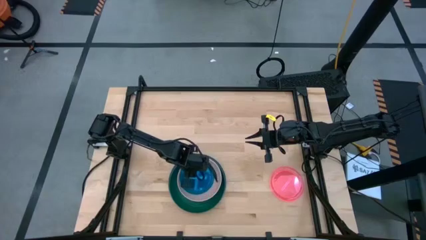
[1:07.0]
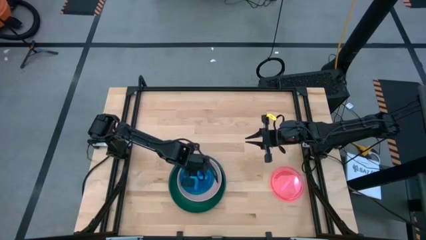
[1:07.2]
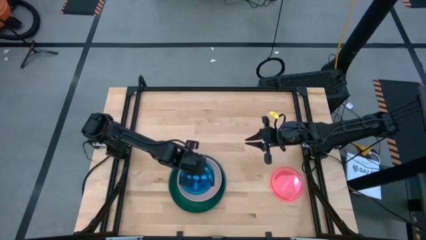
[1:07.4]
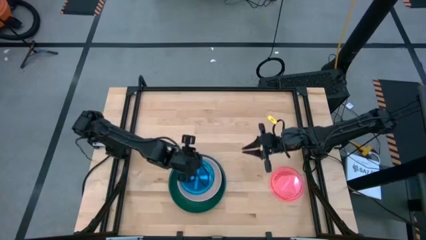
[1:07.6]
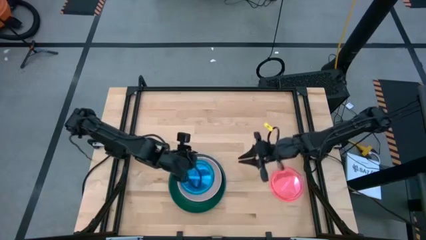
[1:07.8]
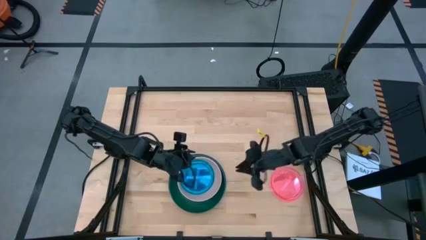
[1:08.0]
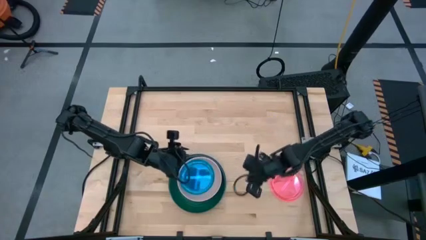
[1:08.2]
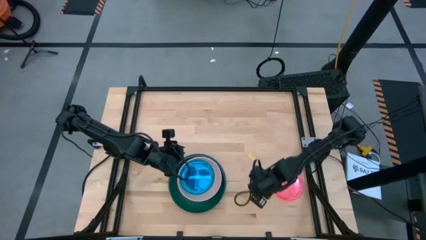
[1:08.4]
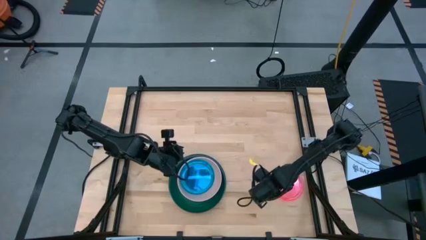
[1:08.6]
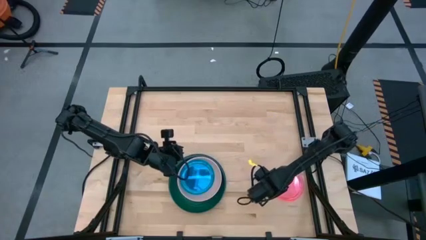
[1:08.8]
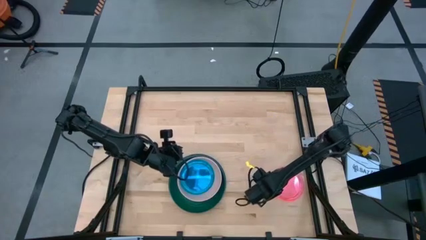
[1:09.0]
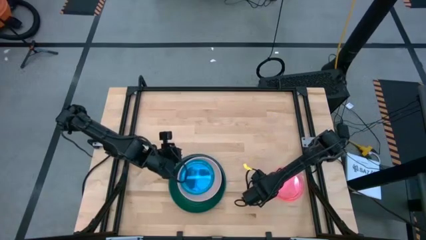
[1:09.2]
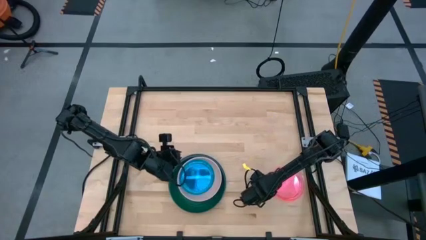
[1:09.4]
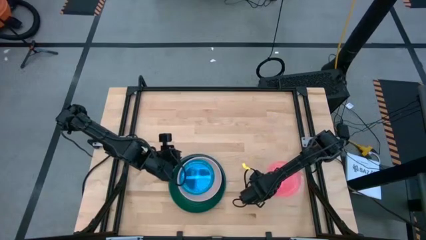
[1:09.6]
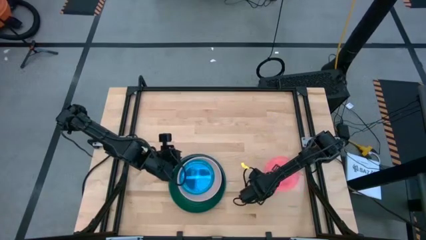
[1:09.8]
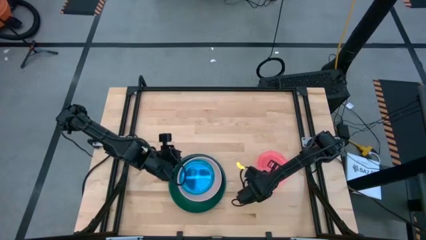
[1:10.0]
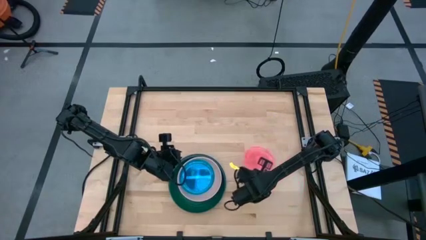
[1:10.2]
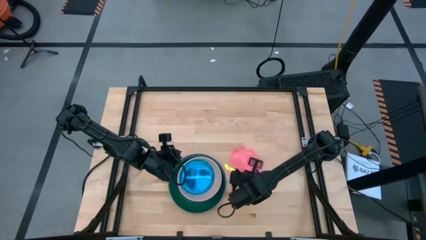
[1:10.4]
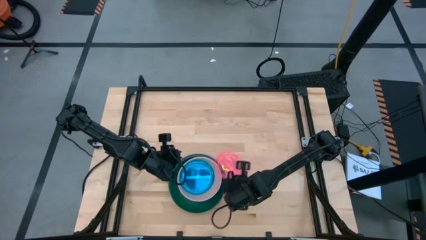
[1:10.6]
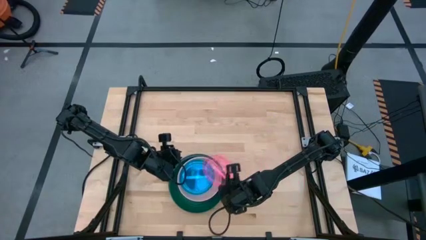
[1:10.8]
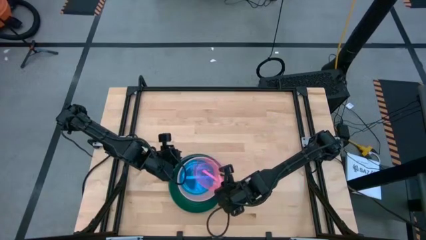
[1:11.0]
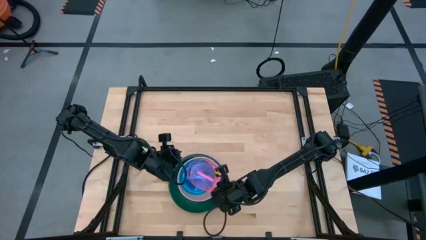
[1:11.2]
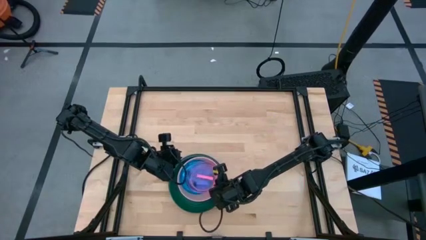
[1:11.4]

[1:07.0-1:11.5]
Task: Stack plastic plates
Stack the pink plate on top of the blue plate

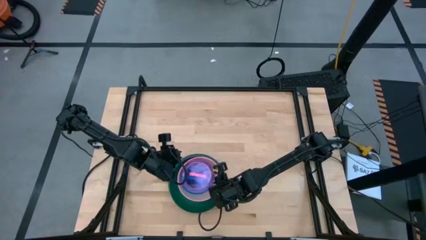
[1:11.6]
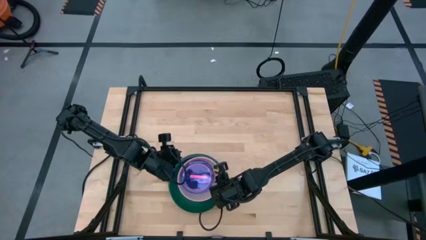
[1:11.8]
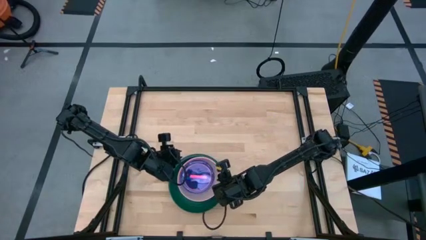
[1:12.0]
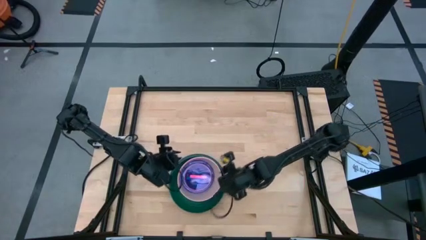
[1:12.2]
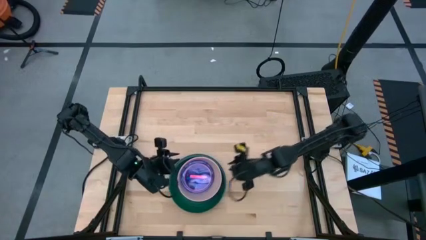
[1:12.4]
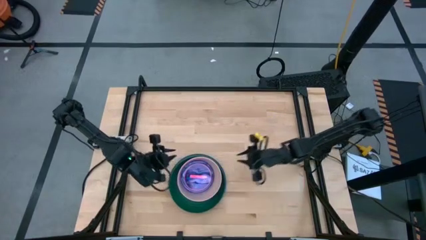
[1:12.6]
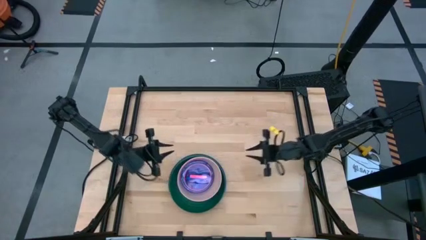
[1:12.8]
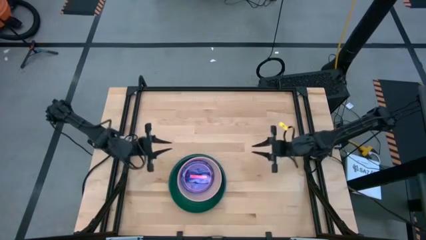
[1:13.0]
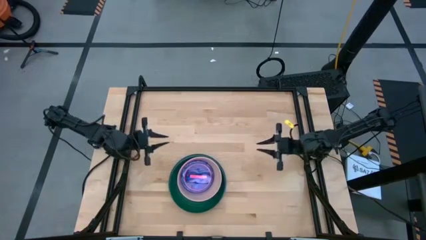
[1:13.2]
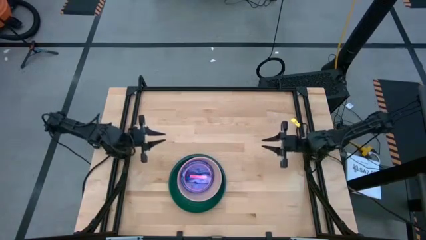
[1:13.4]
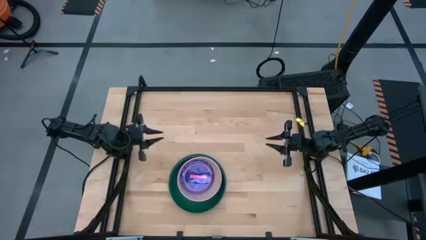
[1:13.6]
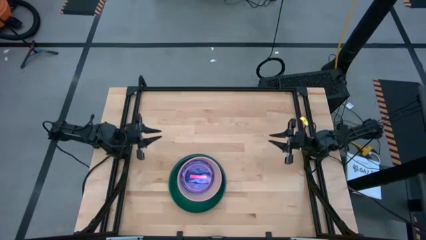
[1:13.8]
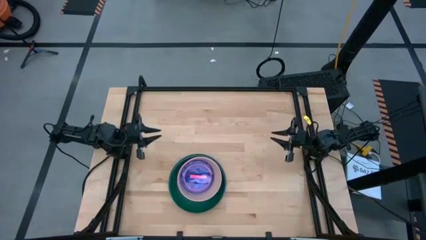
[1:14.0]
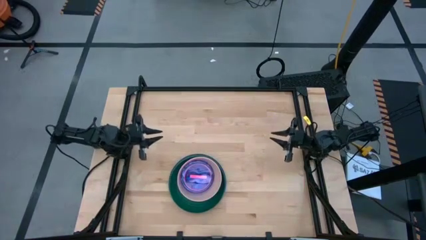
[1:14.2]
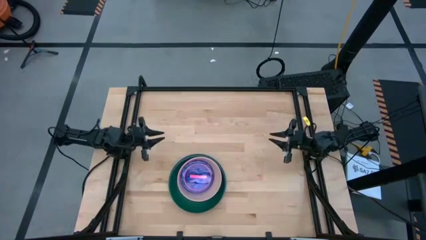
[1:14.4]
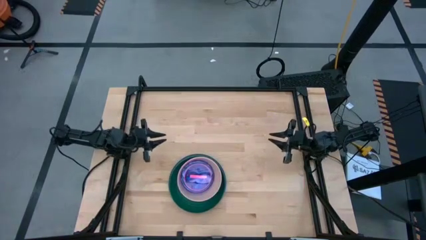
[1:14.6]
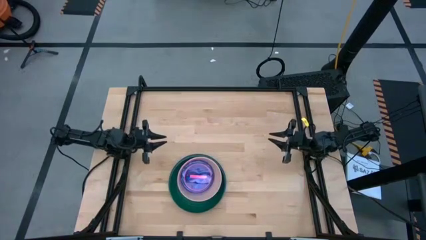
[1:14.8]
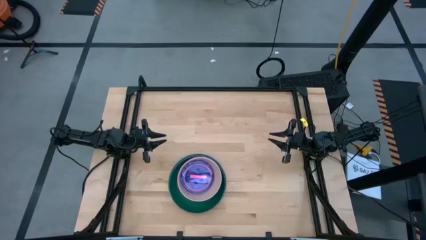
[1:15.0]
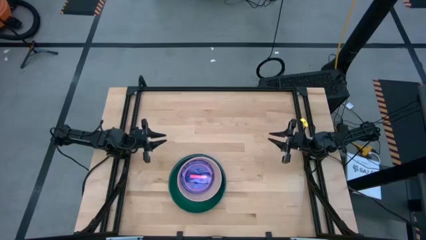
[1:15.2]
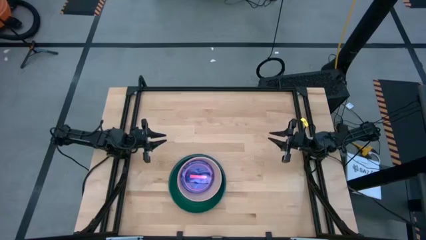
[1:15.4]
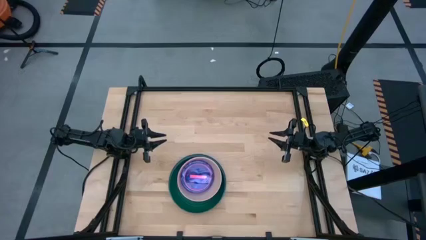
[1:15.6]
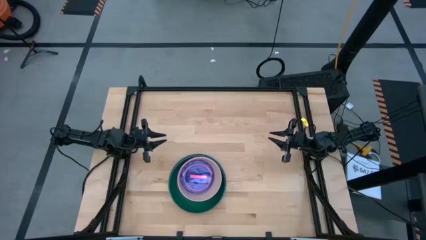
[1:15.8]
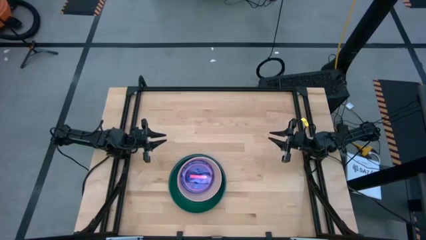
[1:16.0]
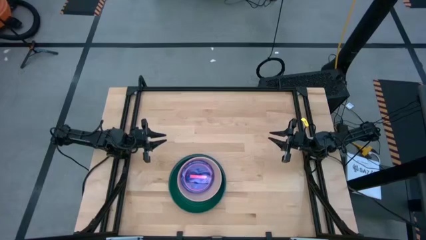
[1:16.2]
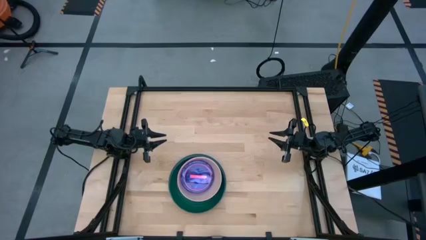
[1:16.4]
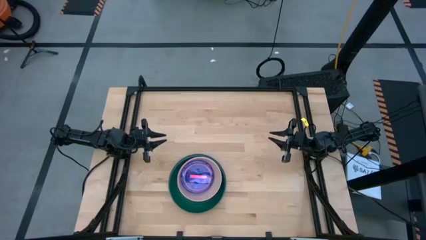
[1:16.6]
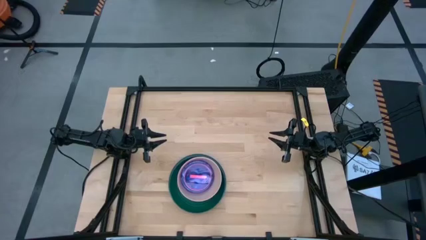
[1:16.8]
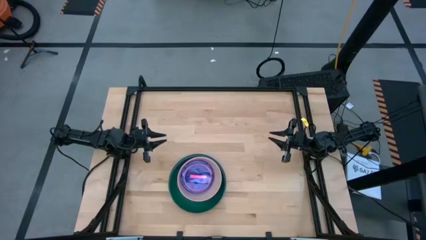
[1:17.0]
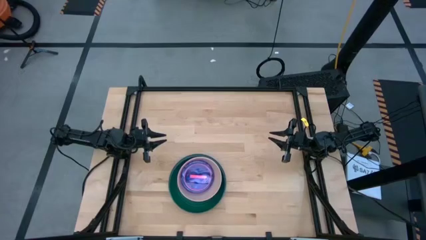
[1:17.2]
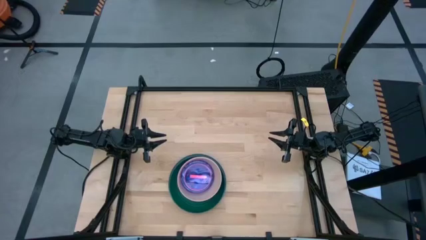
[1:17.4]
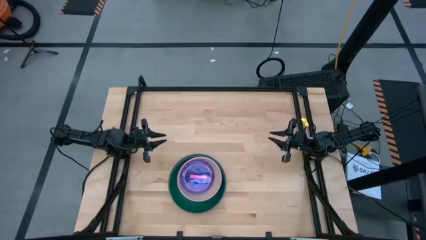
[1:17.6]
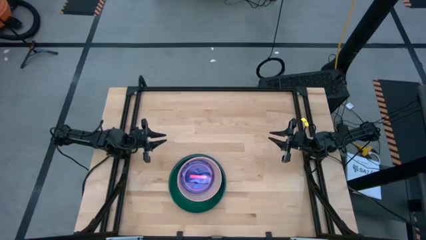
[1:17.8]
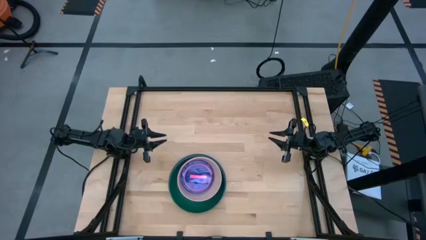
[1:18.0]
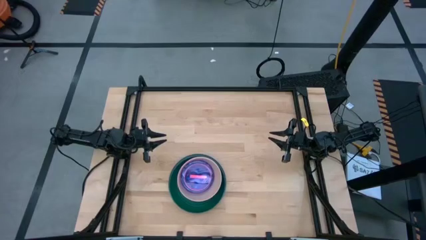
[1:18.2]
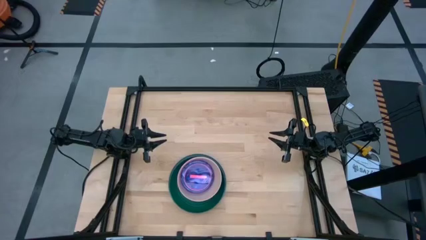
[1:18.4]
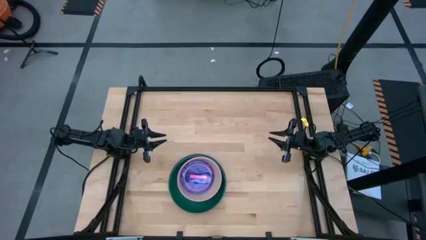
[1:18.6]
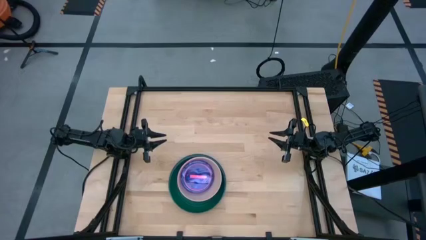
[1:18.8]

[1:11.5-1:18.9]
Return to Home Position
